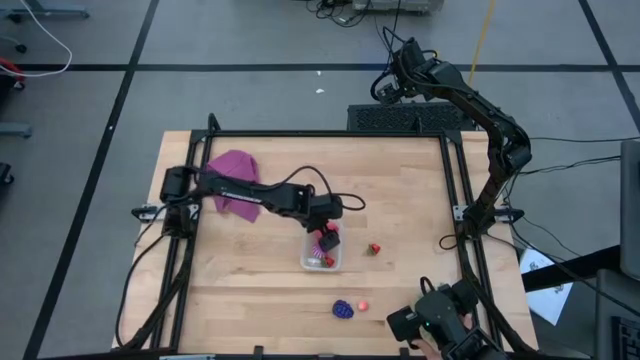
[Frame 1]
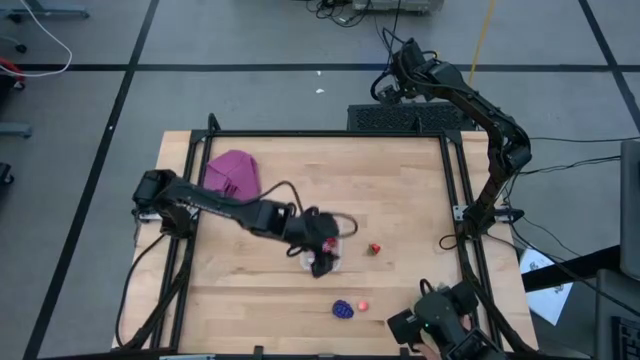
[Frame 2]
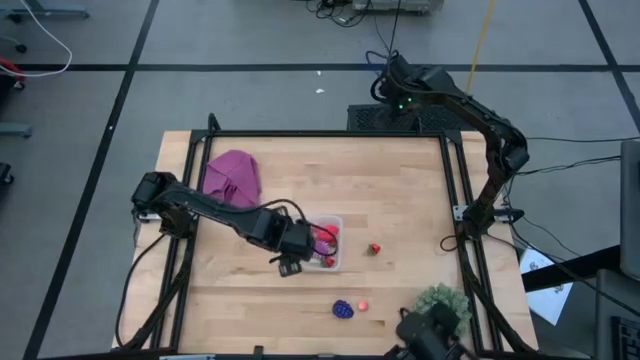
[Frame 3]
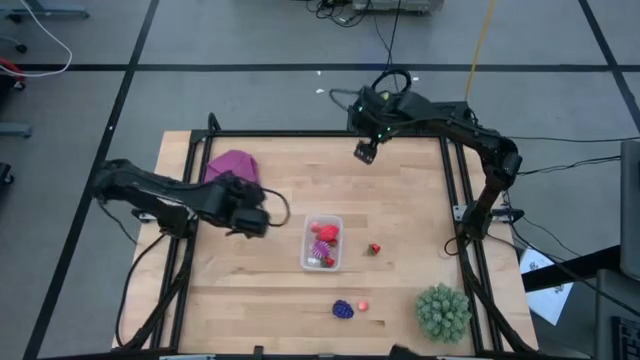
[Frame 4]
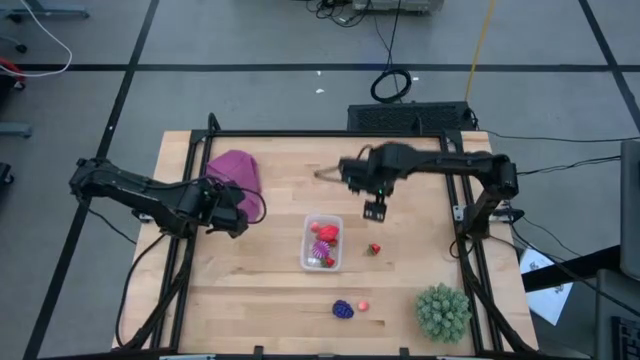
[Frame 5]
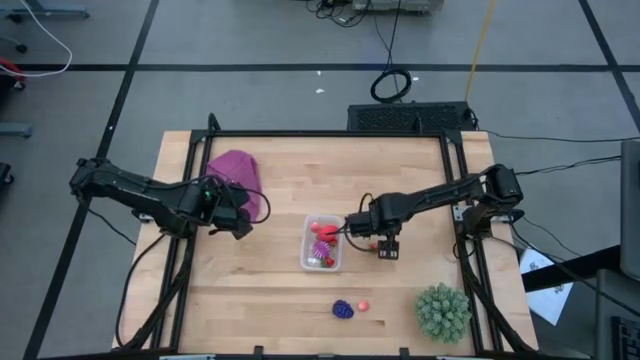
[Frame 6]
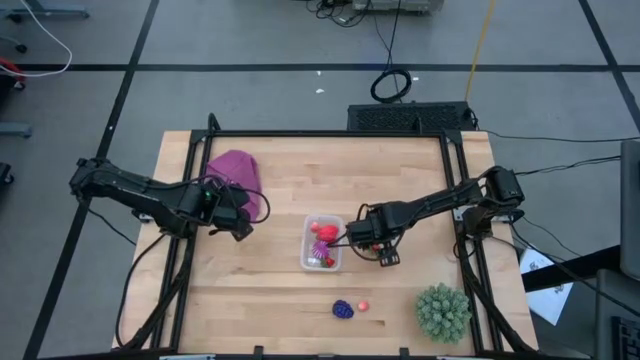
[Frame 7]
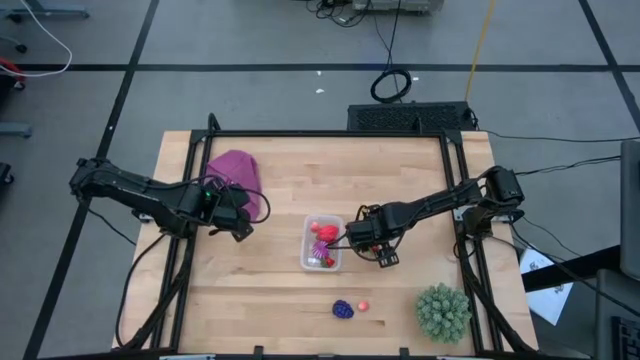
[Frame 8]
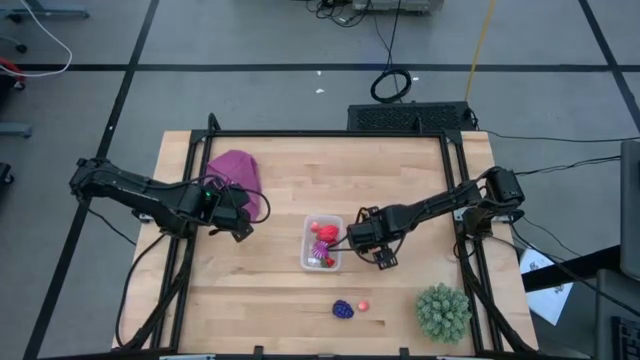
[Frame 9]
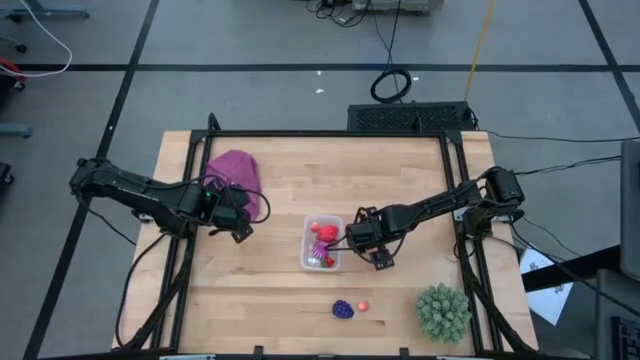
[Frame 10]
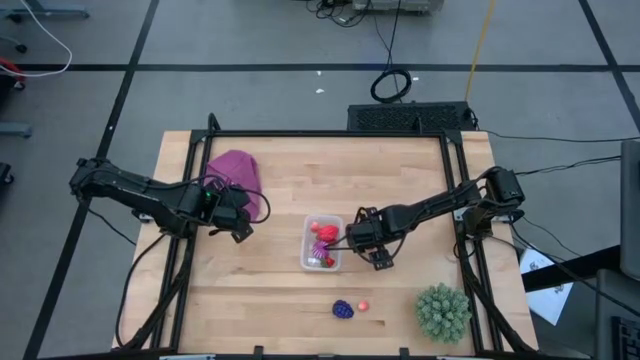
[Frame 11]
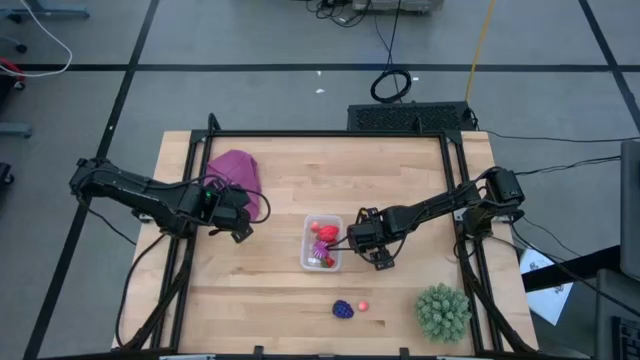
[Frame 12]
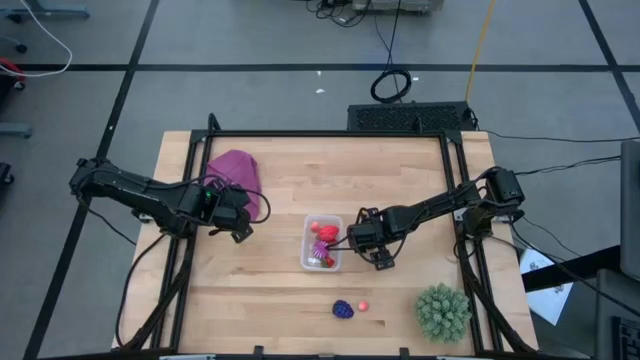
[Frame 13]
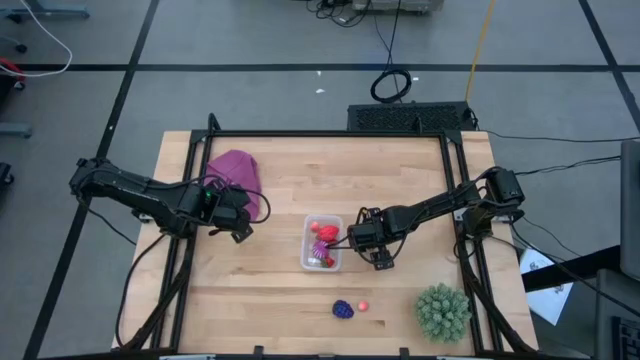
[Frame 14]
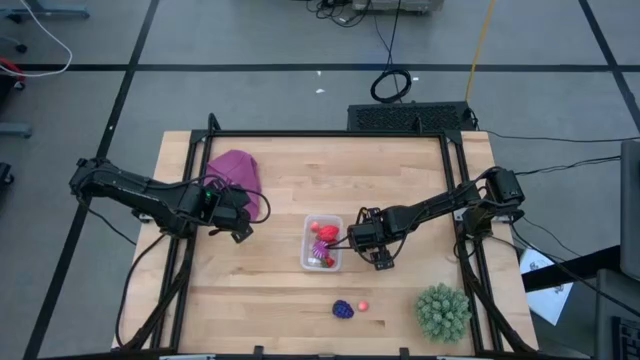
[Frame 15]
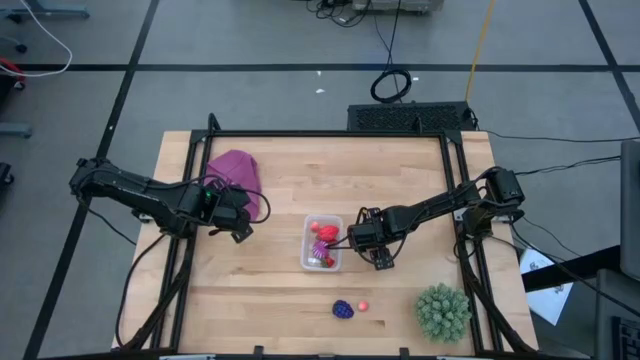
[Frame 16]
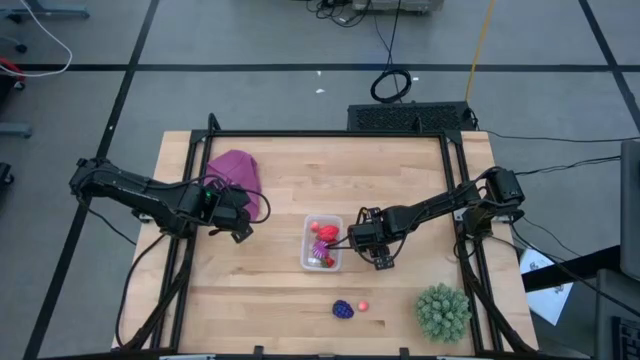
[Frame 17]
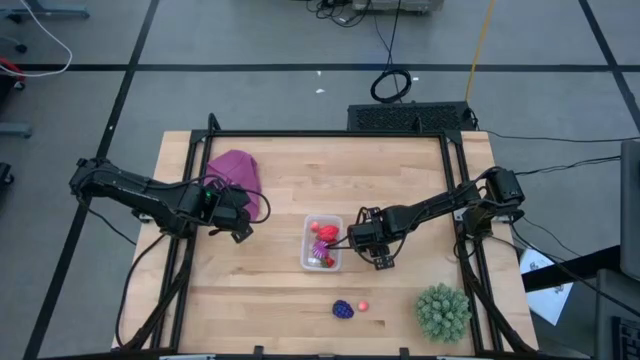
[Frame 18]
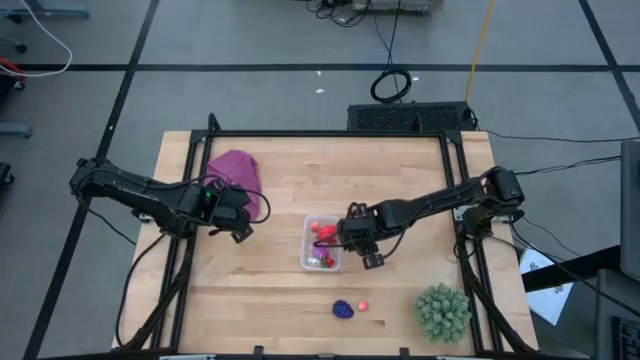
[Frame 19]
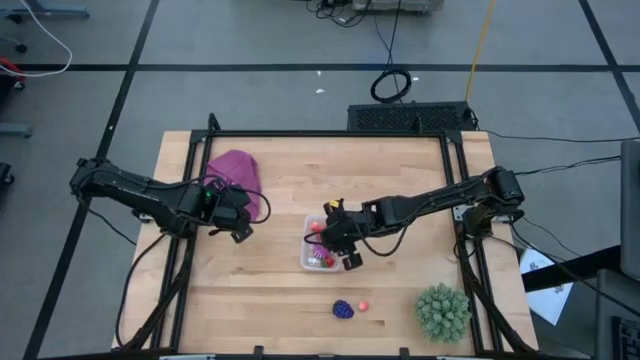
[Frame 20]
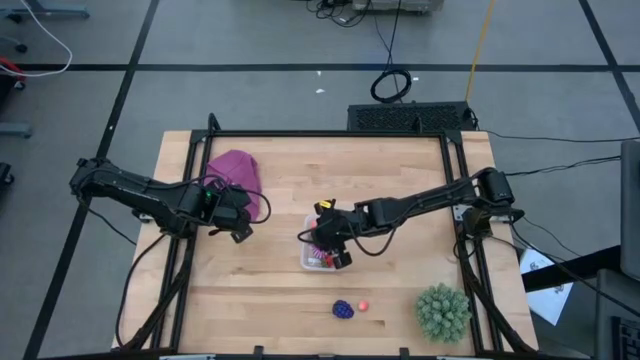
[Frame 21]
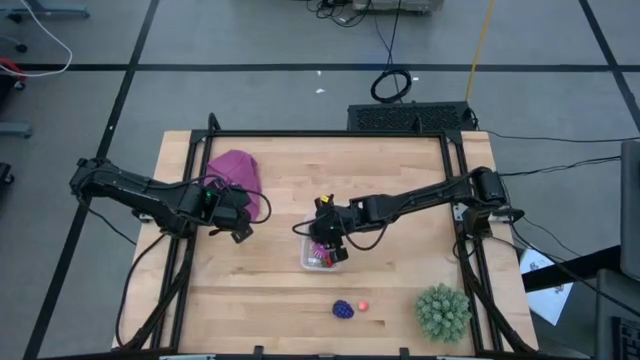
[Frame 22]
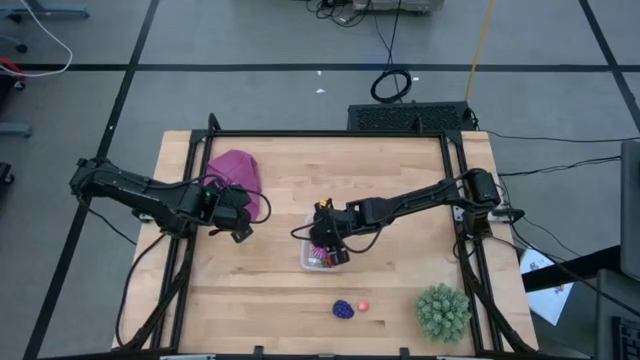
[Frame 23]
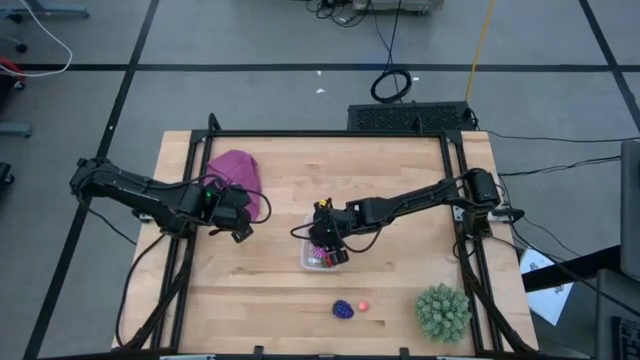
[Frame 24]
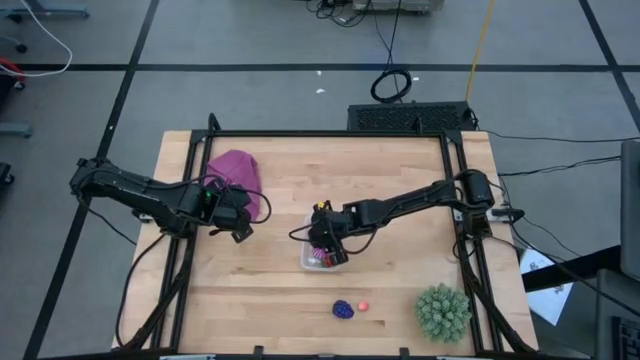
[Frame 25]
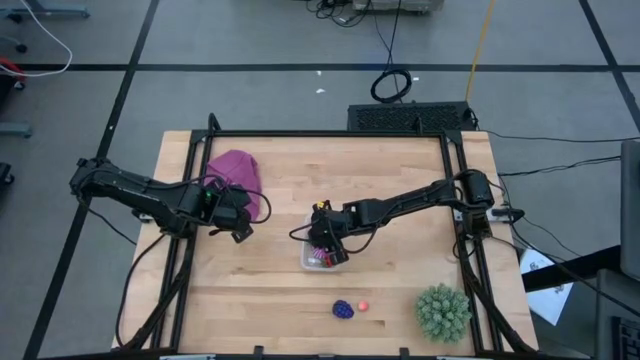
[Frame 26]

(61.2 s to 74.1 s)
Task: Pick and placing Produce into tupperware
Put the strawberry into the transparent bin

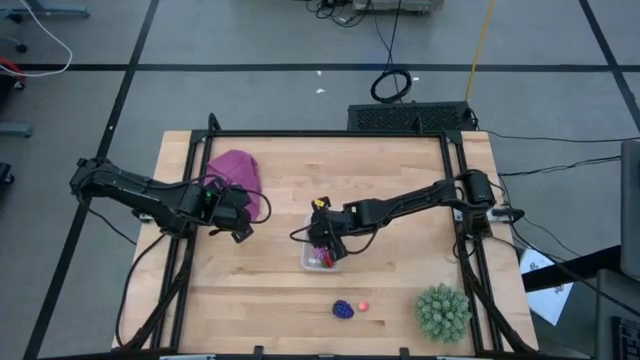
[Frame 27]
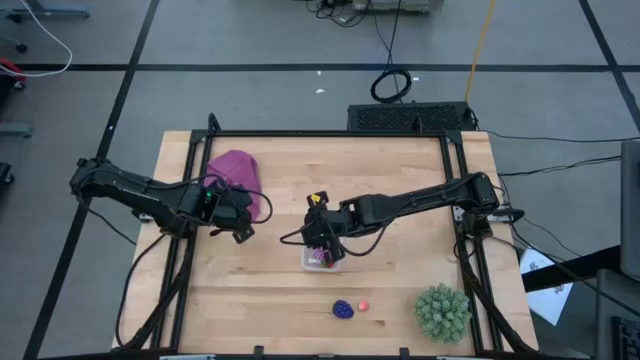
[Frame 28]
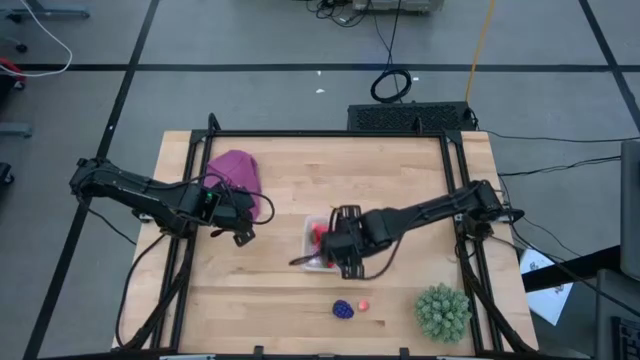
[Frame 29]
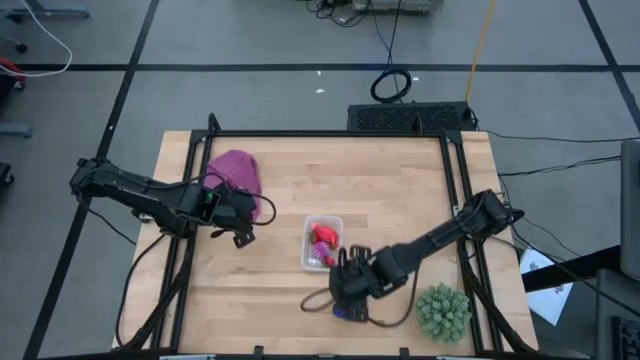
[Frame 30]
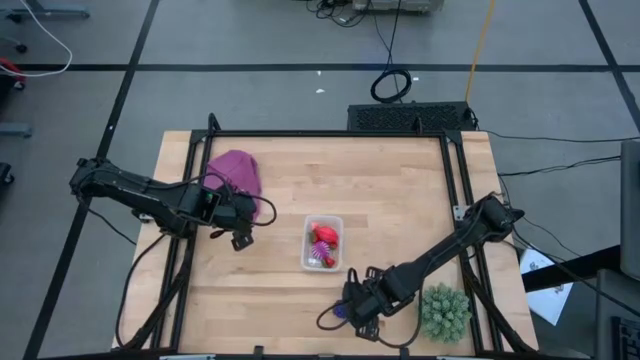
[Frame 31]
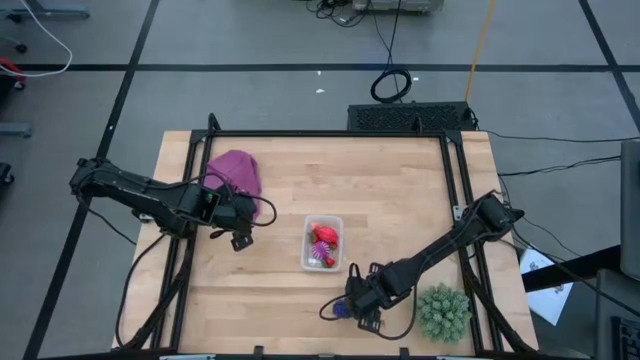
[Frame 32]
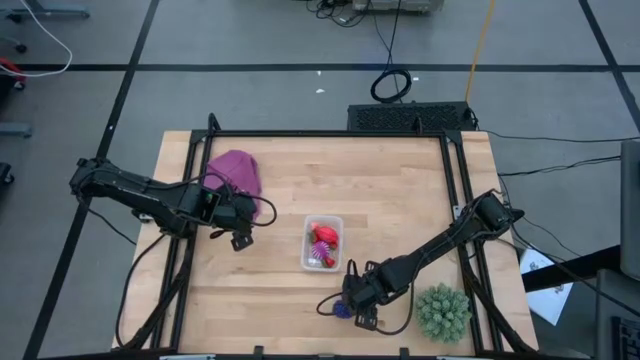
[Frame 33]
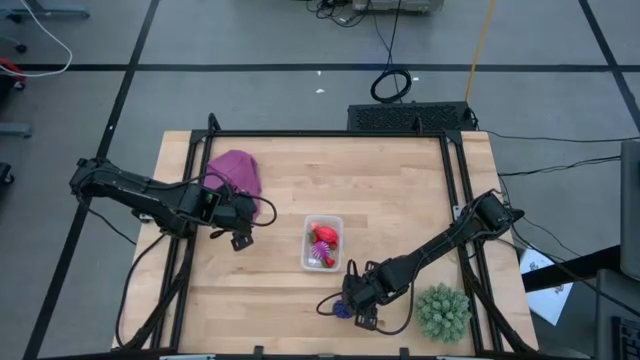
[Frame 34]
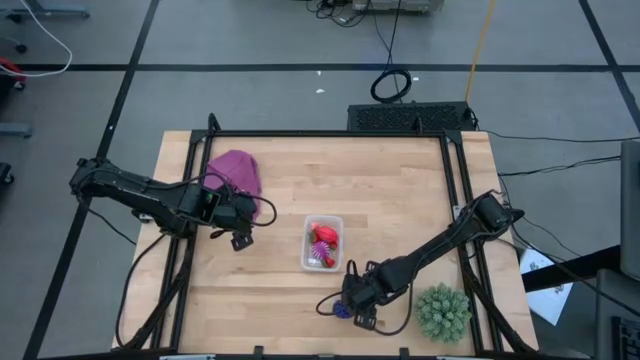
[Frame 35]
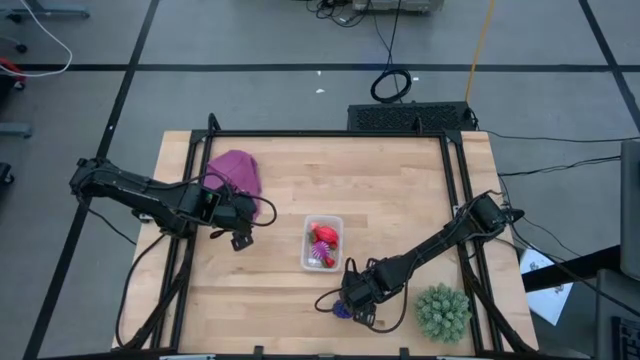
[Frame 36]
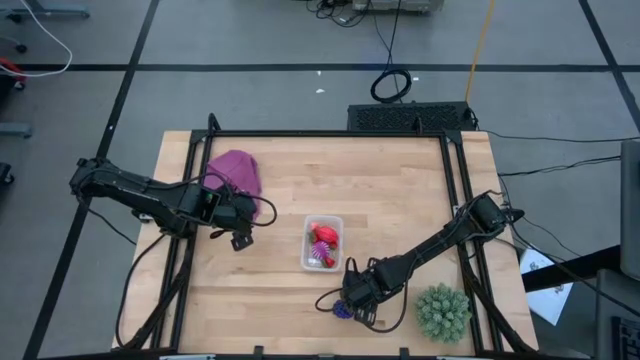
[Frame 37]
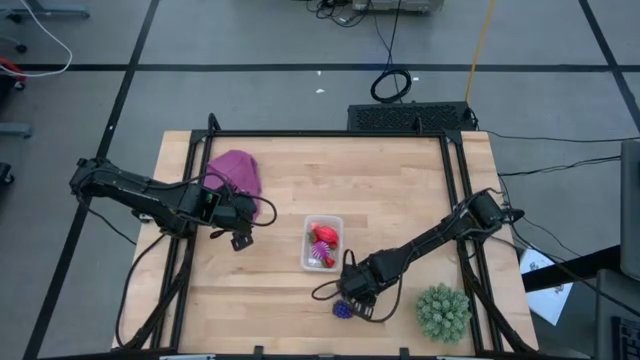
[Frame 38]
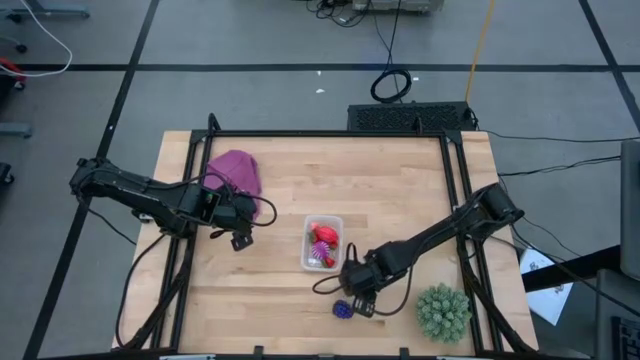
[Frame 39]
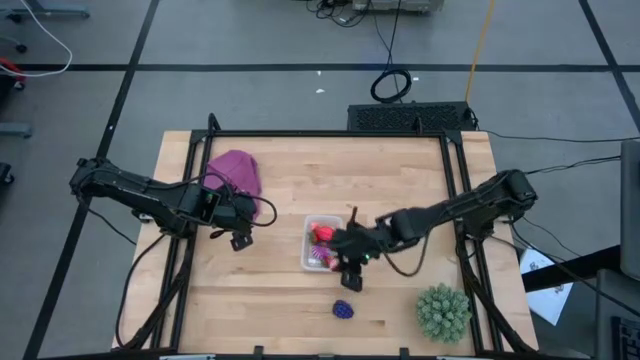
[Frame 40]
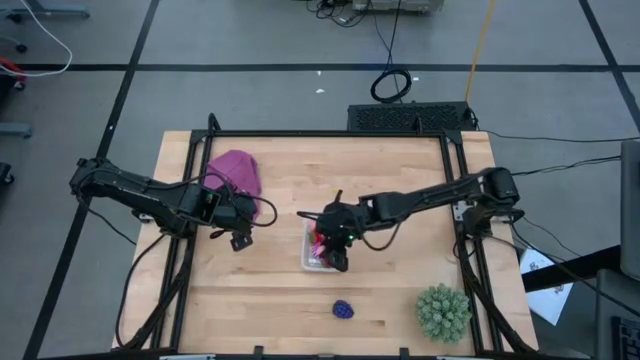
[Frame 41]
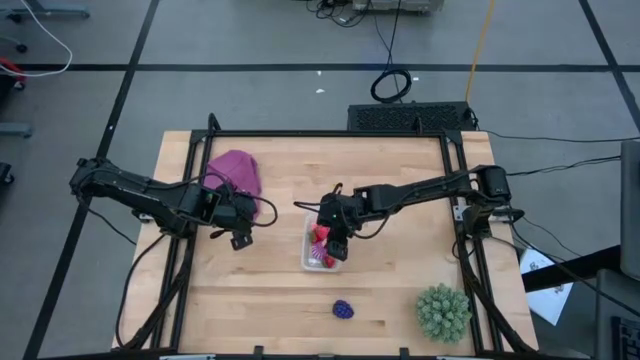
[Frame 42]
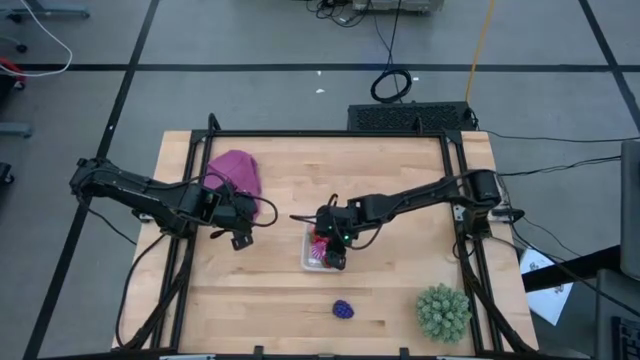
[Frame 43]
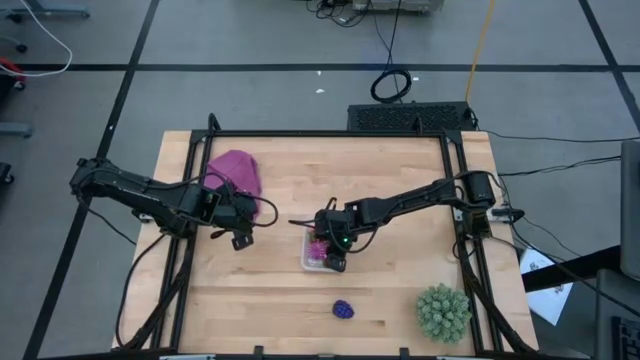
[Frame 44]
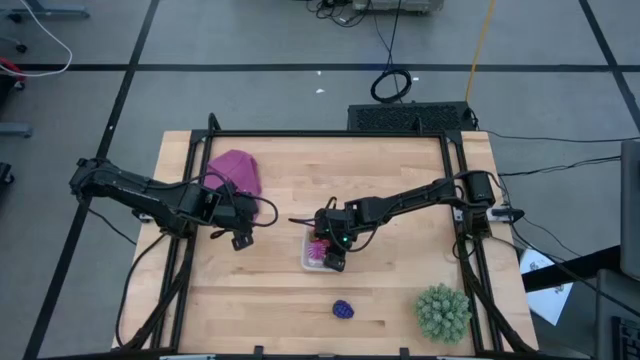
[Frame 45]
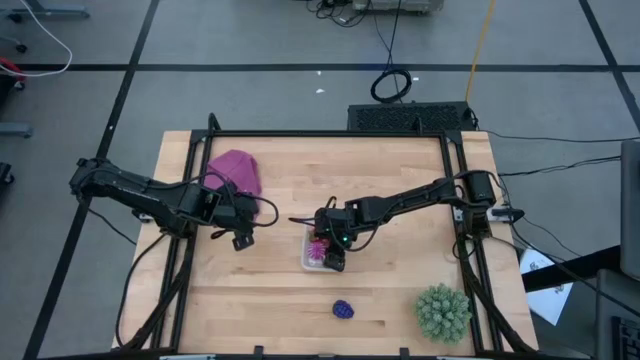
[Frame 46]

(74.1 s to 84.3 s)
Put the peach into the transparent bin
